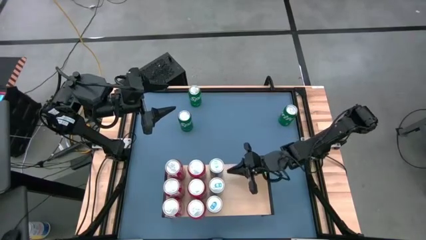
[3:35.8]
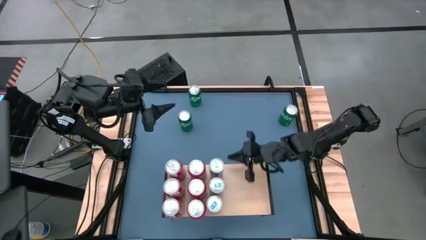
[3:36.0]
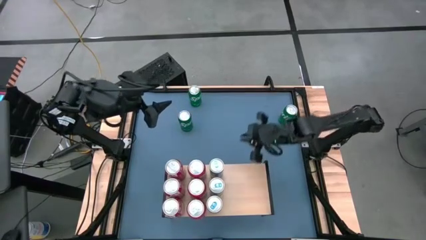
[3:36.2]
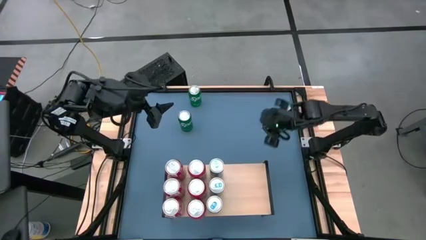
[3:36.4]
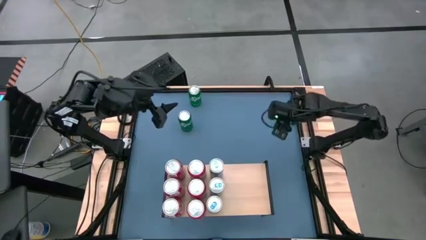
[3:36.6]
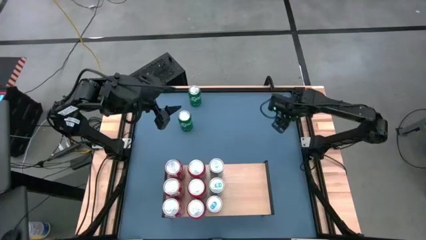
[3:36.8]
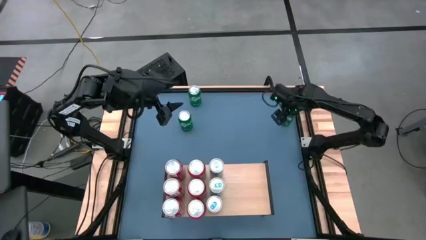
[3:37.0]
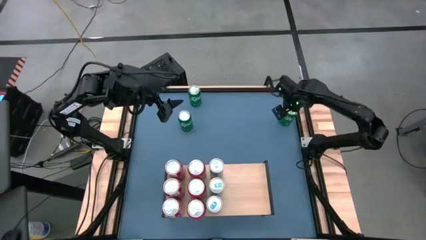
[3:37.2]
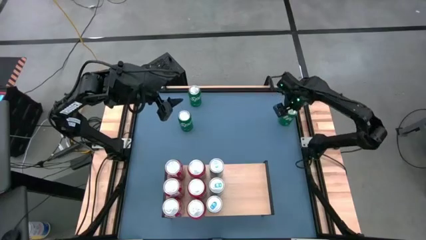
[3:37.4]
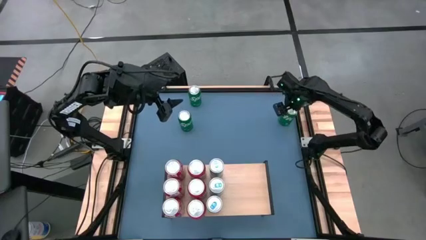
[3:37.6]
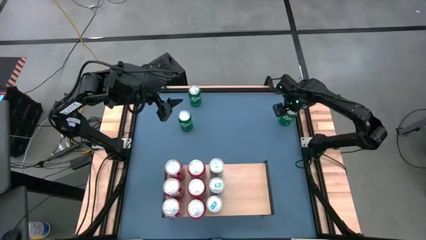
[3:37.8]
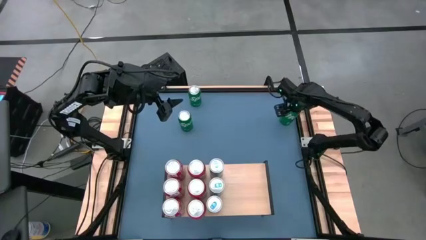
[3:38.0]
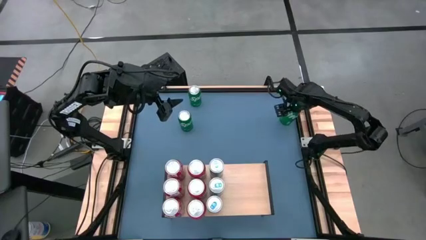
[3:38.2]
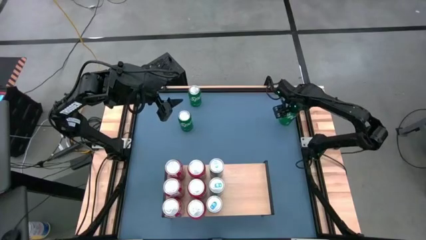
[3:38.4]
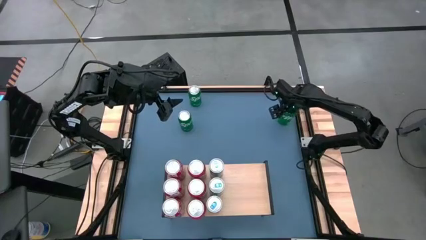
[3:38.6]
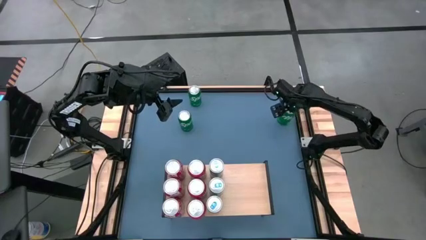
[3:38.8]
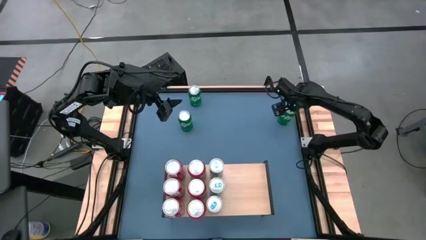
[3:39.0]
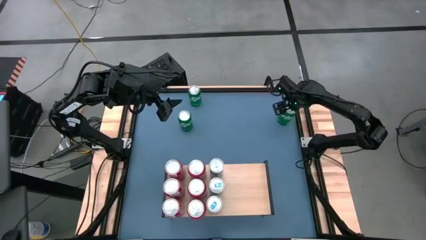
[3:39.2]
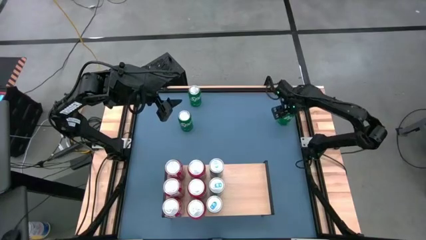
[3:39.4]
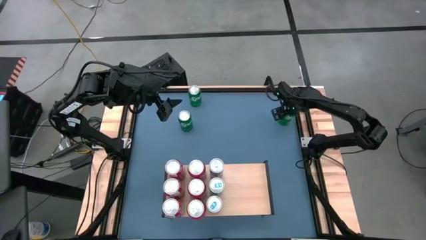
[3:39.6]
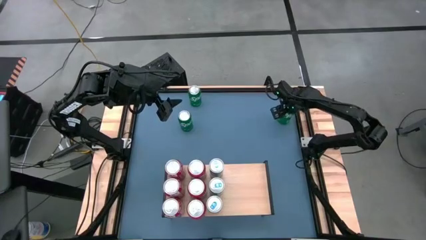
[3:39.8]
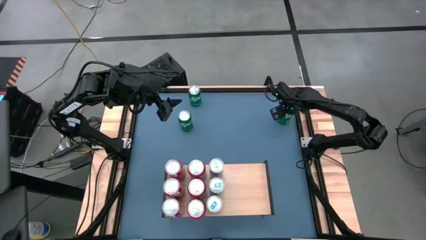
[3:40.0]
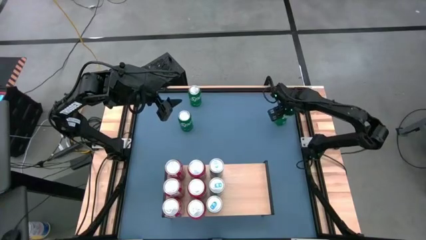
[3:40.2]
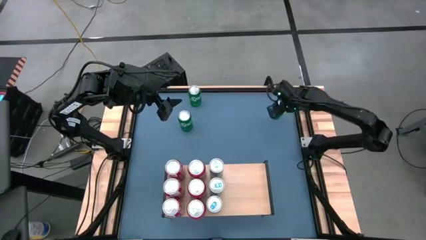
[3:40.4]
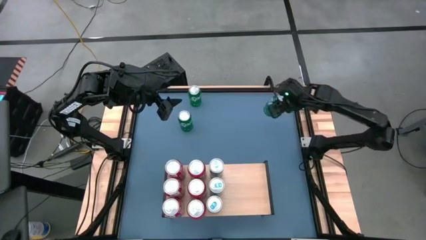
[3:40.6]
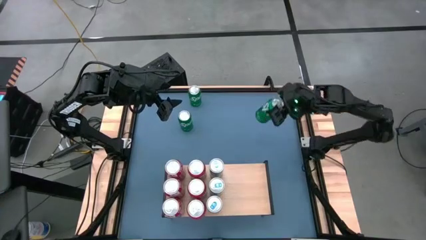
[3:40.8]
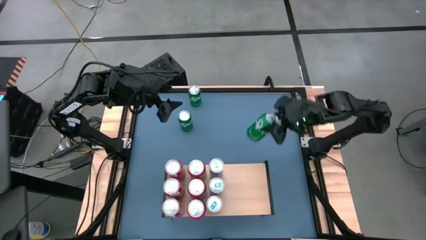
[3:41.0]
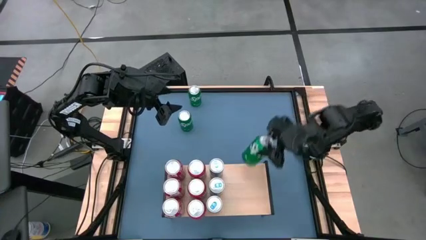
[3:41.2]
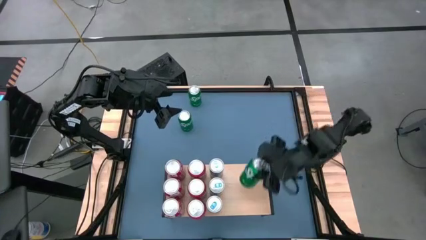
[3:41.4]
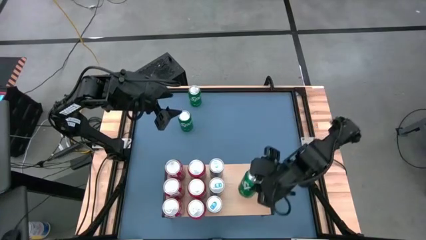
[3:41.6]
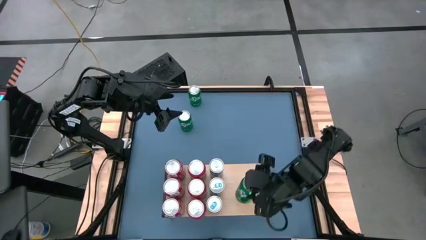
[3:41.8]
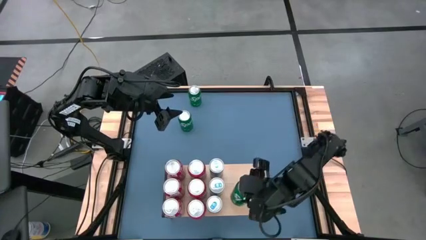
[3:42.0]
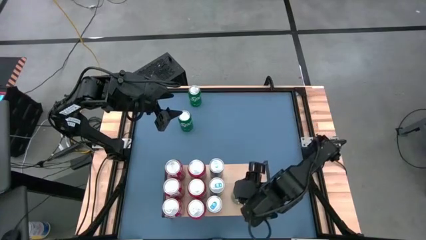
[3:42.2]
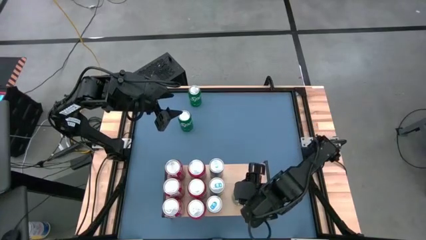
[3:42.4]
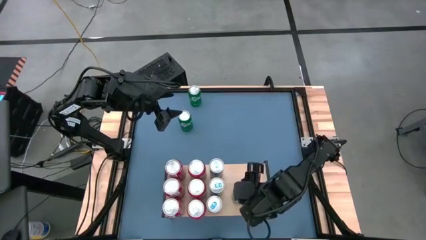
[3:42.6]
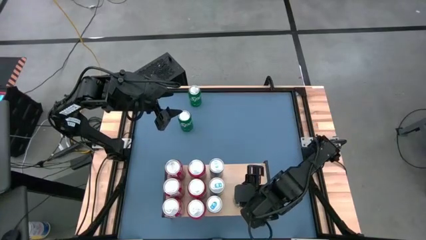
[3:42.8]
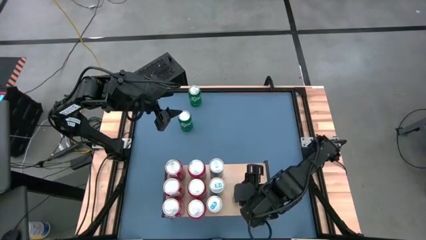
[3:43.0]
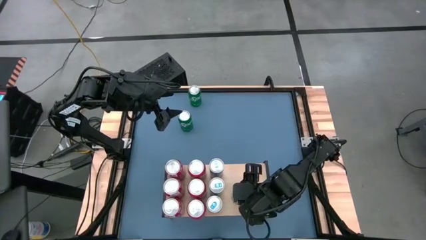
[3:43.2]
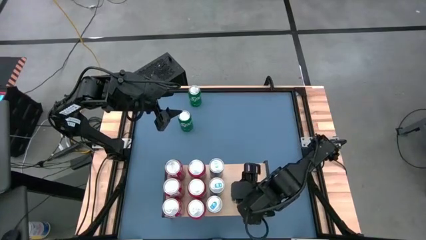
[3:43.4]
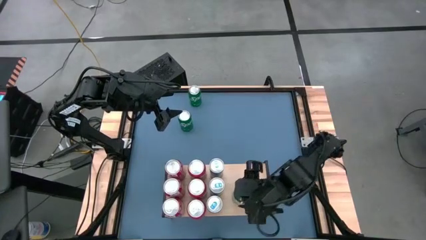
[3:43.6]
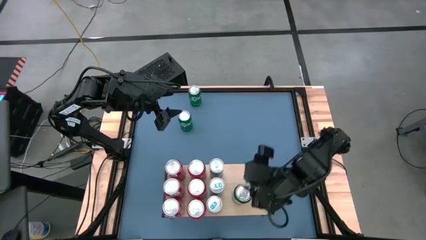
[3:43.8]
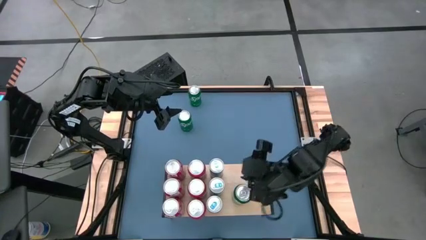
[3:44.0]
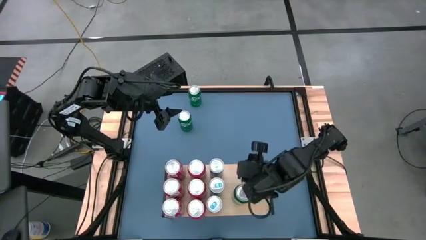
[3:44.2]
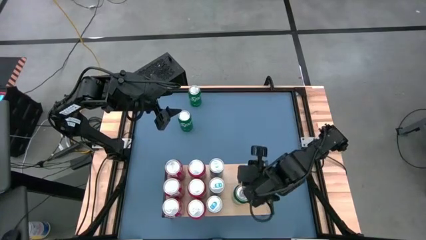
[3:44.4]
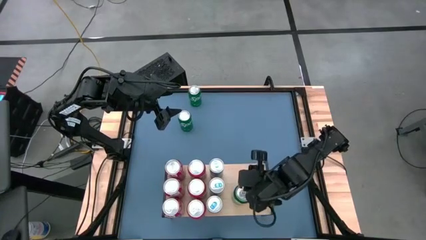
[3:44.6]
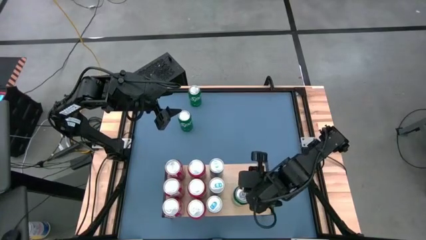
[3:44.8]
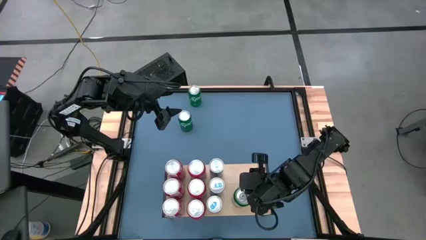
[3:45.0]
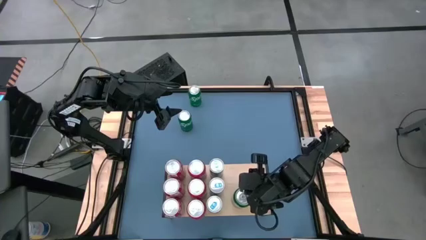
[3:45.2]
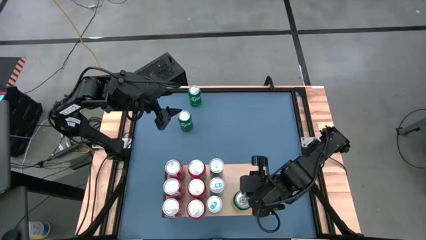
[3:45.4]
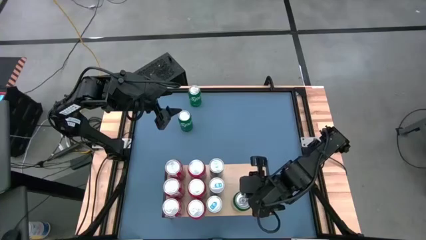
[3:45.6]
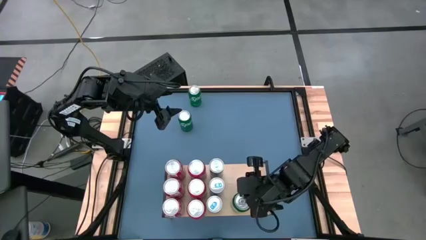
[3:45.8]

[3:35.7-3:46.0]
Task: Place canned beverage on shelf
Put the right green soda can on the shelf

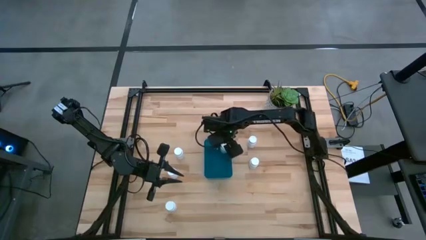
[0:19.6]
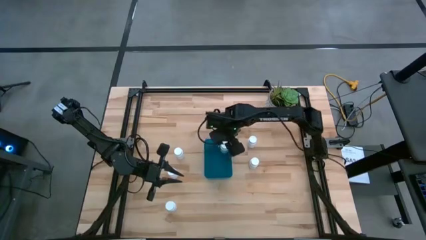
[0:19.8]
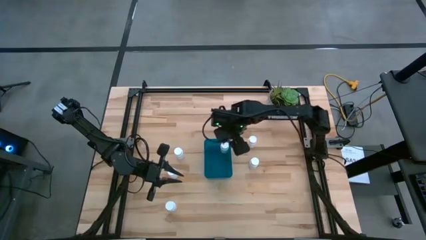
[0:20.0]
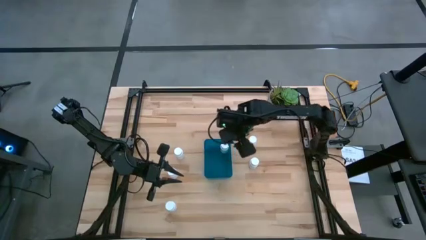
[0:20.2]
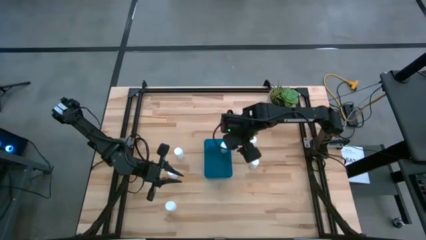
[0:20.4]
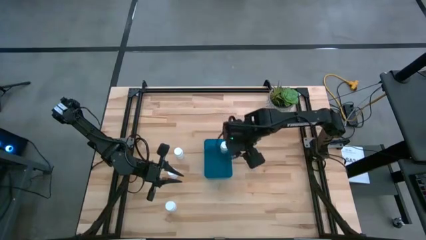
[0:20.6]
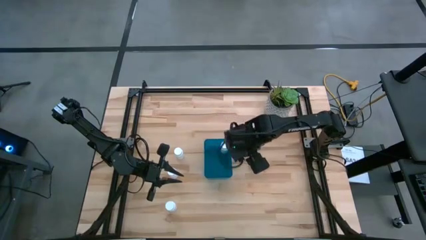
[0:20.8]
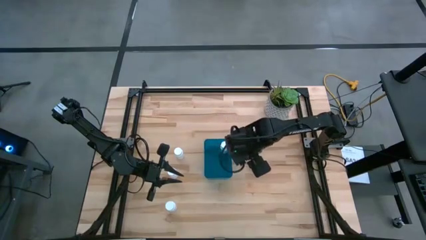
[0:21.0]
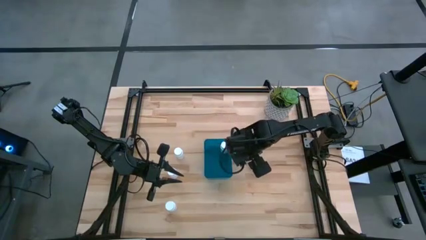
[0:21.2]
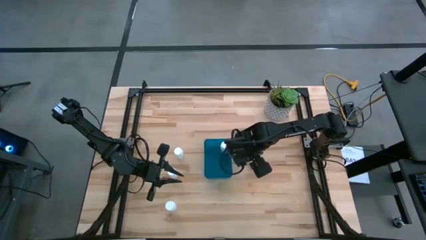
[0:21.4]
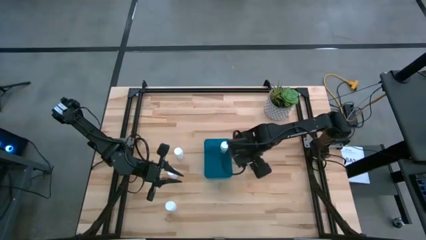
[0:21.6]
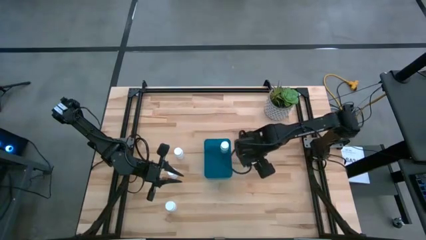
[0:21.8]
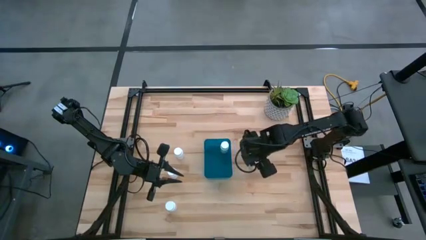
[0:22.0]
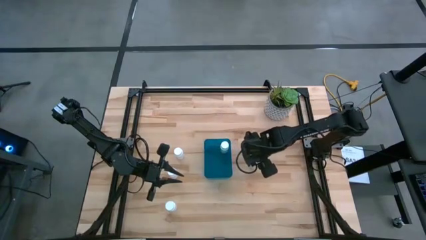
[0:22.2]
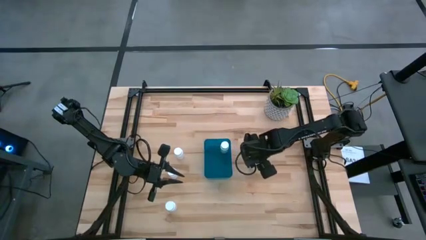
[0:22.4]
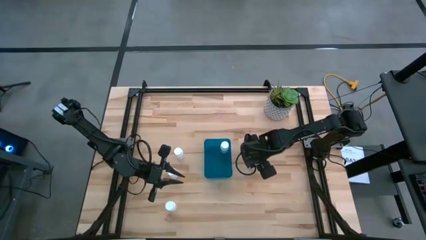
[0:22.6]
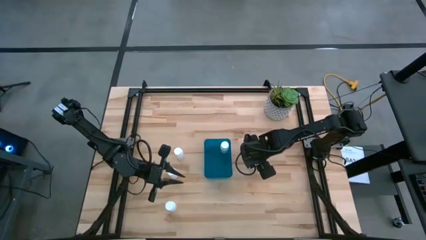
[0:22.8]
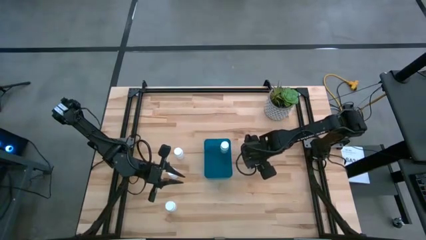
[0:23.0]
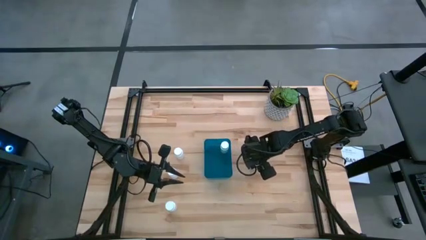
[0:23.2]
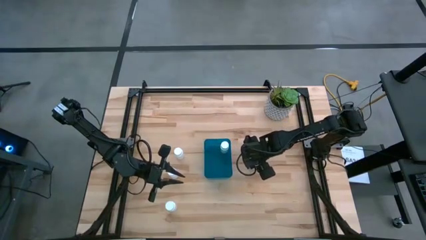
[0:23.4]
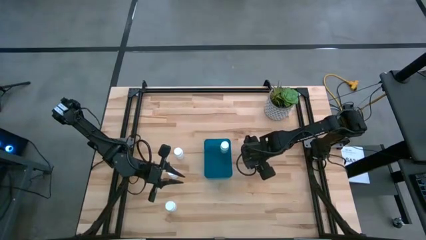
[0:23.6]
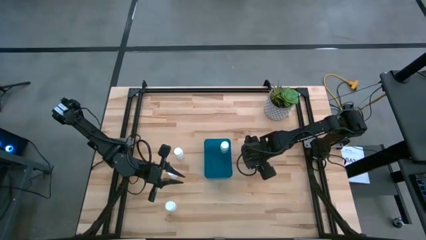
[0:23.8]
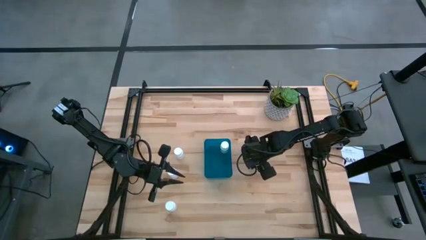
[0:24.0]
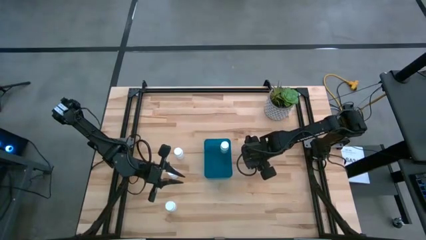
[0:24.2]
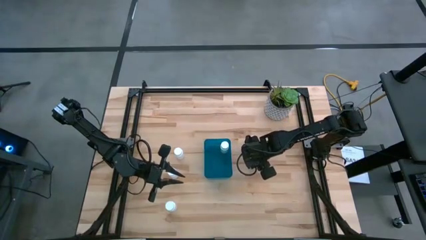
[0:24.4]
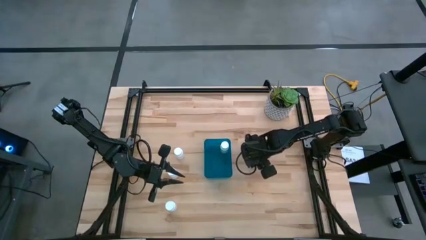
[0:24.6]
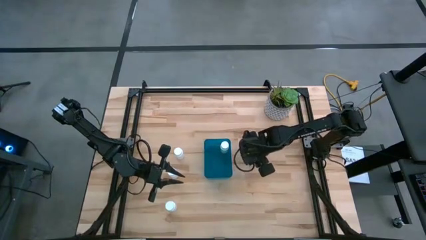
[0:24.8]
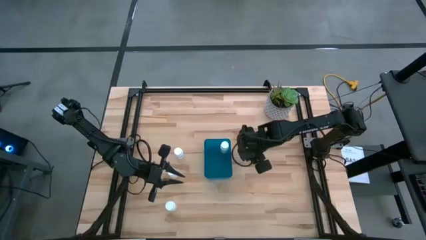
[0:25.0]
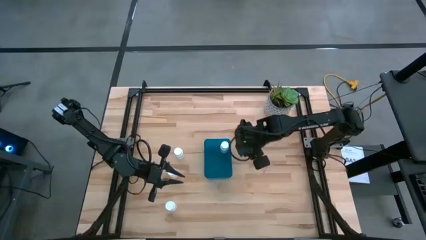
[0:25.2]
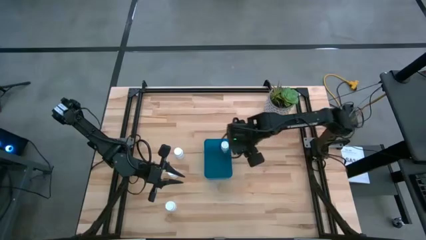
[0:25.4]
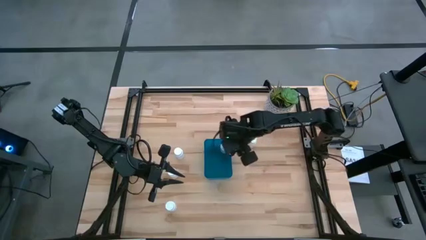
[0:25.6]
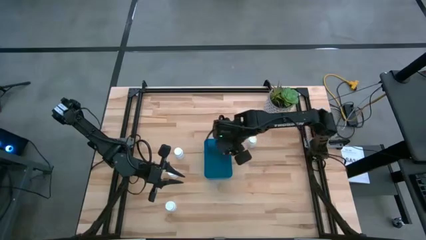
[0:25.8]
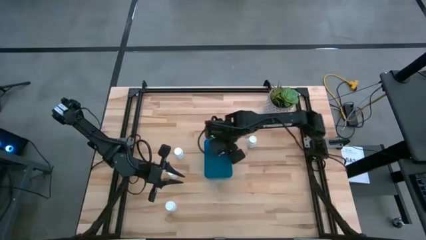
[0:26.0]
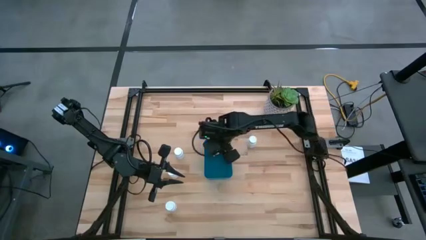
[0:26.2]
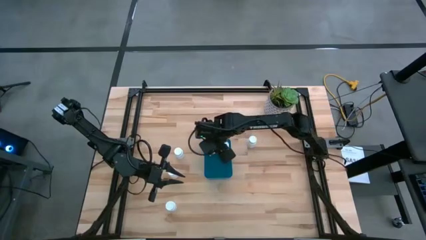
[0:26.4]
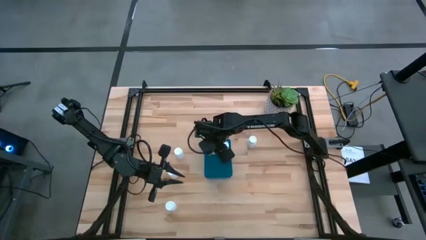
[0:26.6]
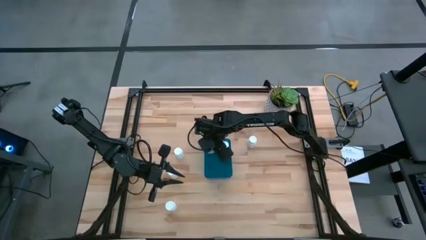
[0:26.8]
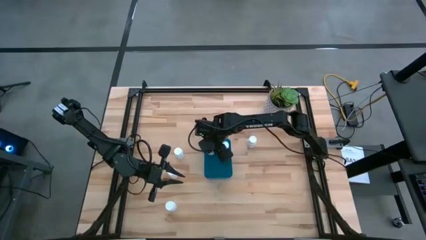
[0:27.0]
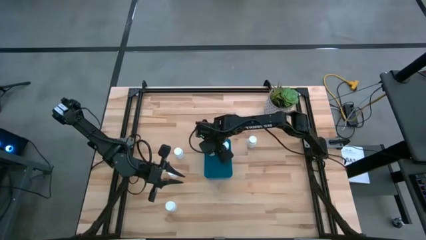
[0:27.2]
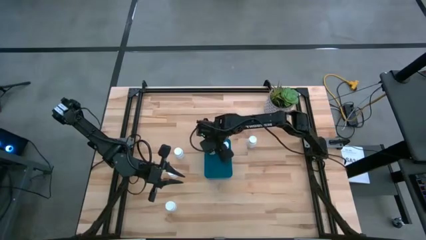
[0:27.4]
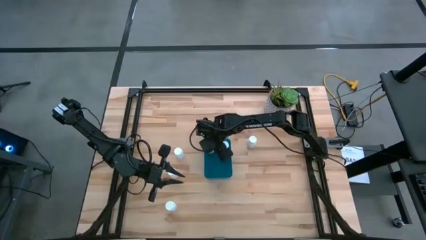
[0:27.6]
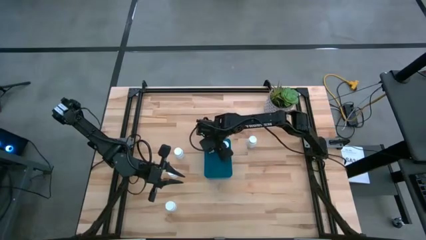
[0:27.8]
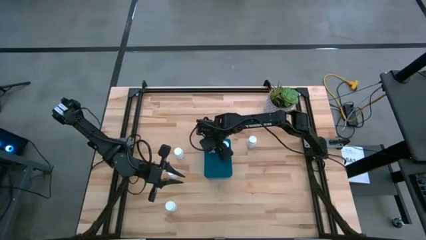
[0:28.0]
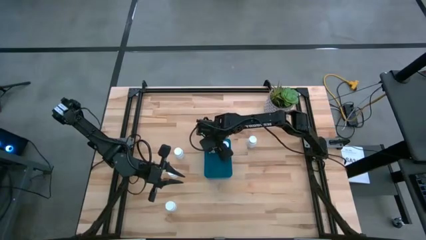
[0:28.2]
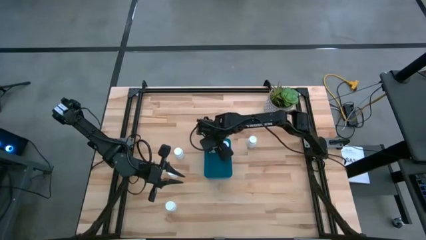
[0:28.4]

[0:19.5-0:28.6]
Task: Pick and place pill bottles into a basket
Put the medicine bottle in the blue bin
